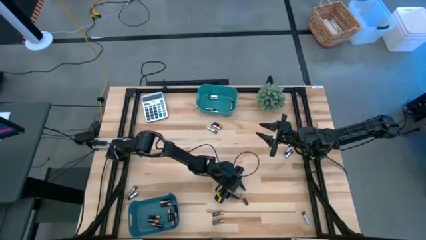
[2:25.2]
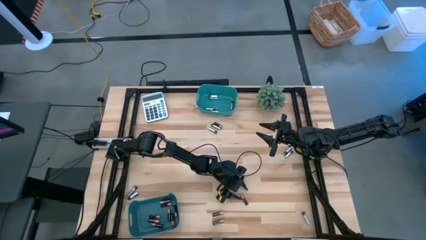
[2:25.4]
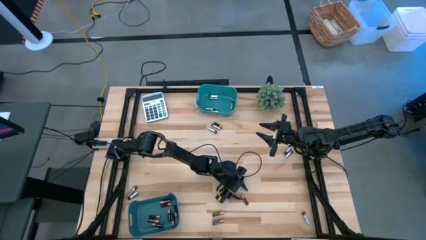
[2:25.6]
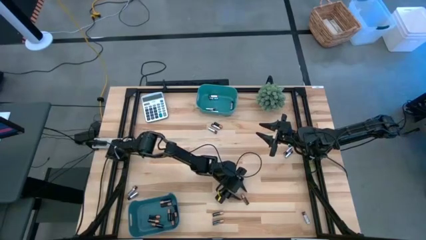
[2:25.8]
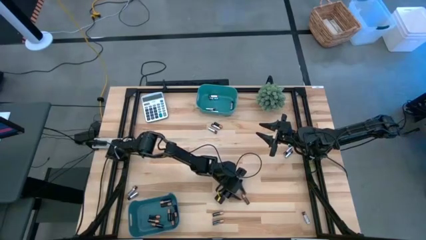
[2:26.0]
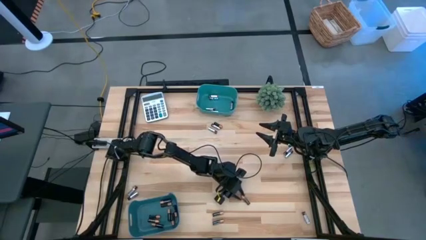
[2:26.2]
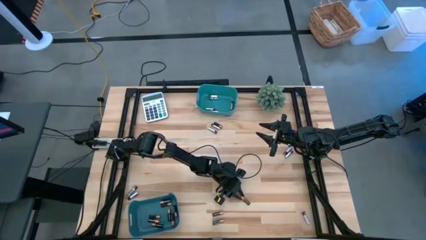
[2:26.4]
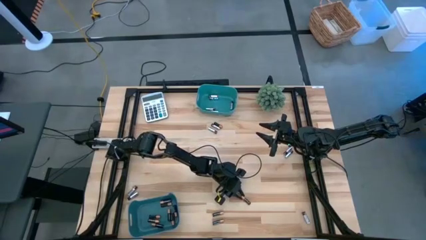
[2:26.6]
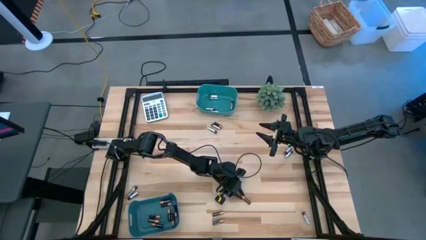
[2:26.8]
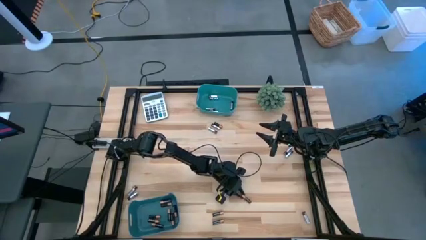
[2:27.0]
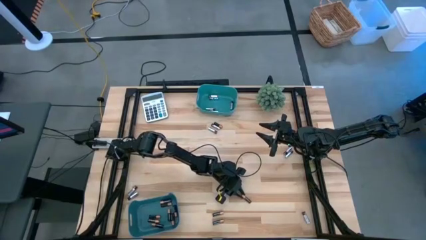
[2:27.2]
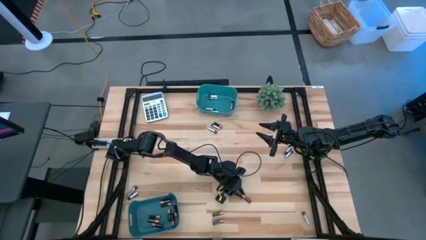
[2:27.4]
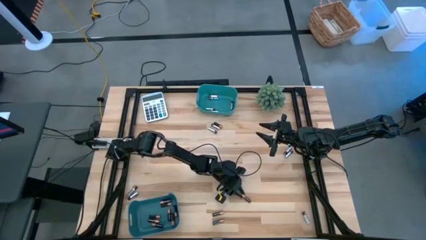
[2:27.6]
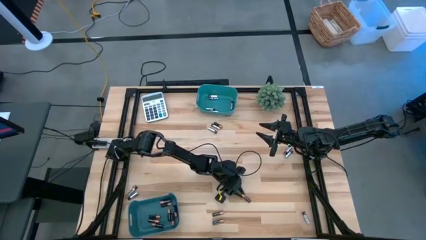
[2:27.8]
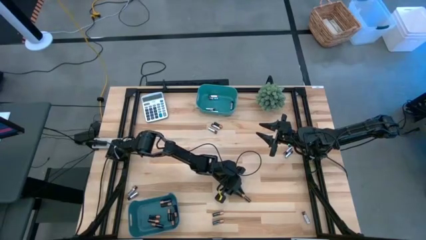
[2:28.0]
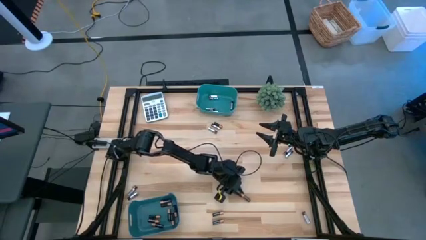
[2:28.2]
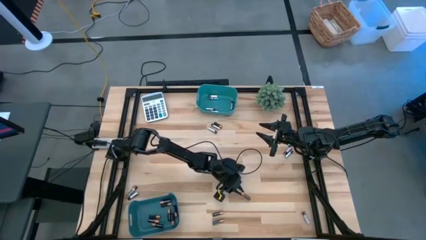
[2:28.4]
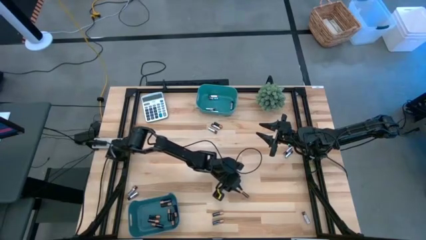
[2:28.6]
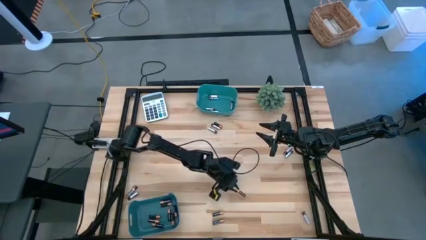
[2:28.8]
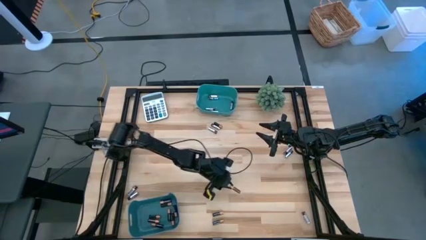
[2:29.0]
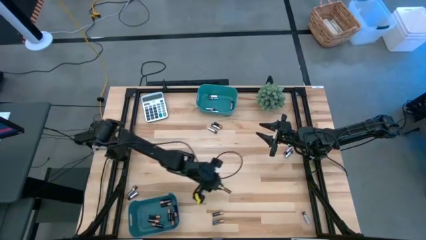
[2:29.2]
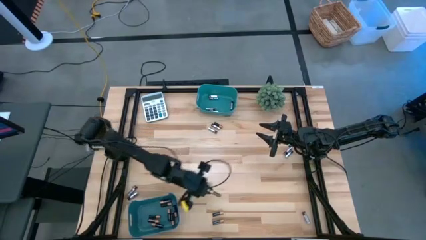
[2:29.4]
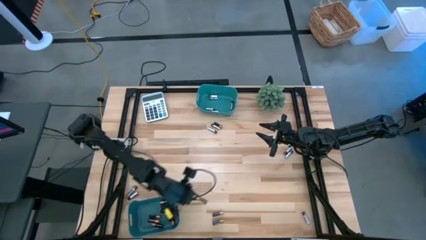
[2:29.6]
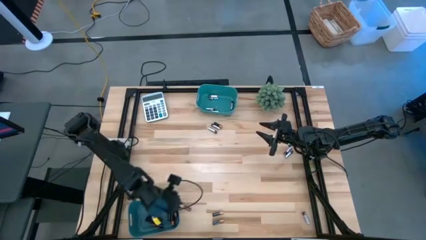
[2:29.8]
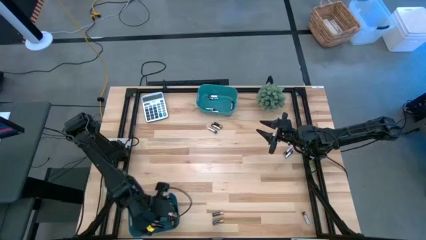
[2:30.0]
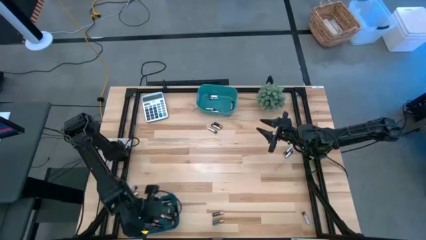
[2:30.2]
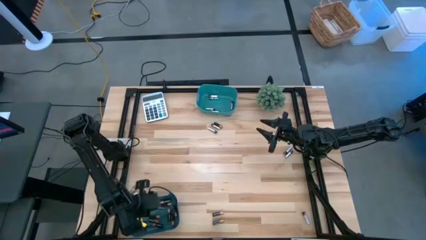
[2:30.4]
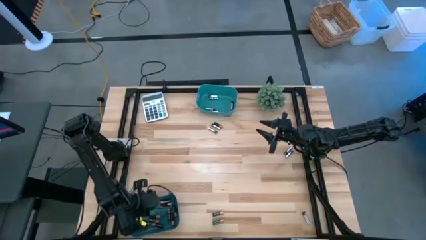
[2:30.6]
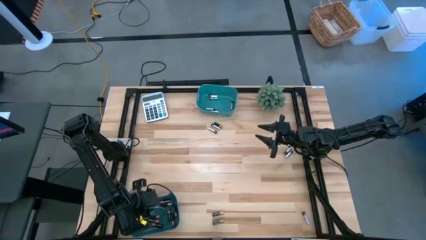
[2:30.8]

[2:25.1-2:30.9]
Task: Sort batteries
Put the gold battery into the bottom green bin

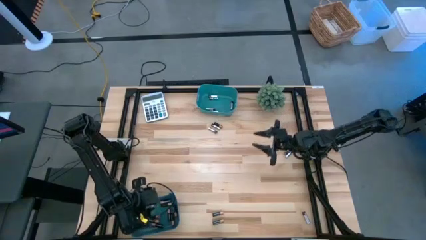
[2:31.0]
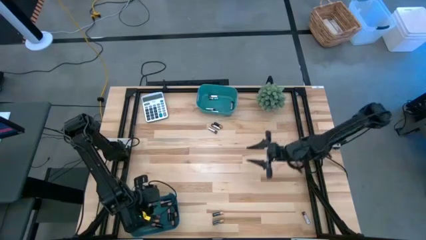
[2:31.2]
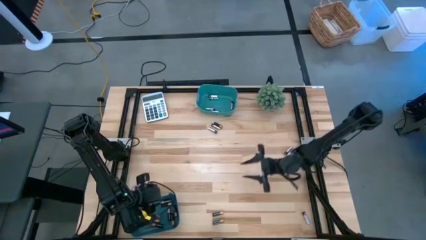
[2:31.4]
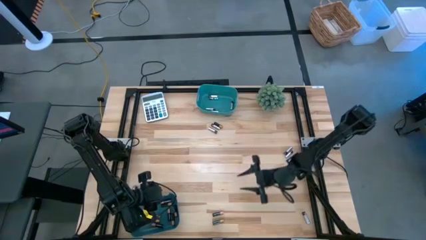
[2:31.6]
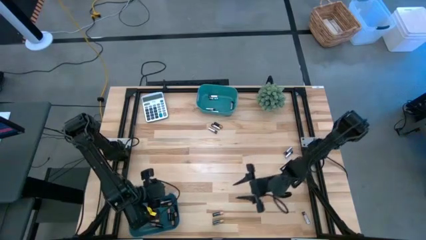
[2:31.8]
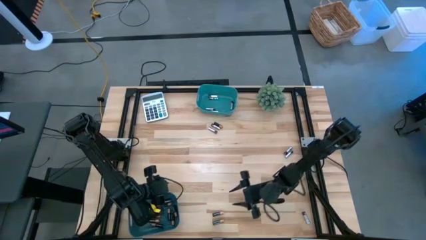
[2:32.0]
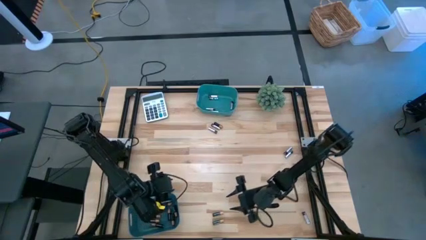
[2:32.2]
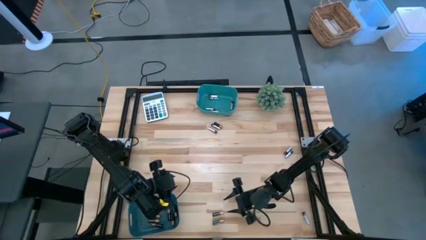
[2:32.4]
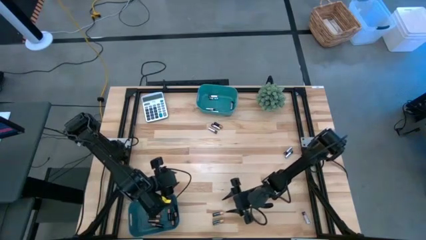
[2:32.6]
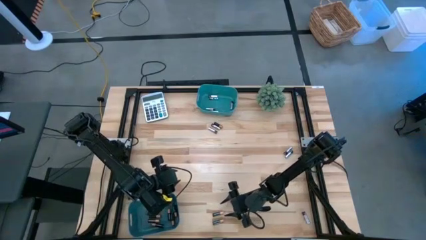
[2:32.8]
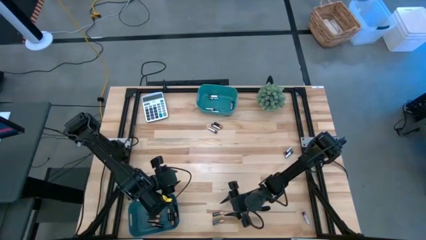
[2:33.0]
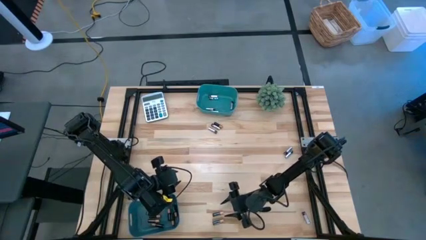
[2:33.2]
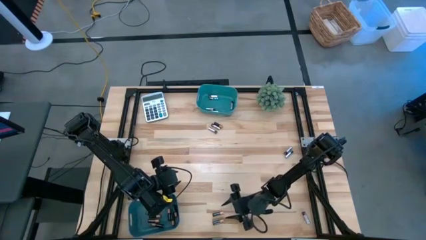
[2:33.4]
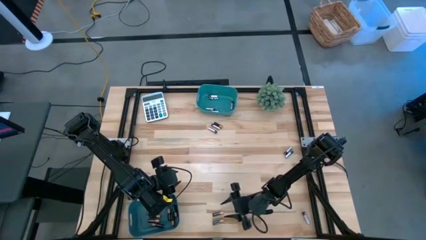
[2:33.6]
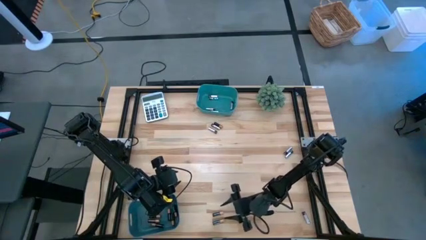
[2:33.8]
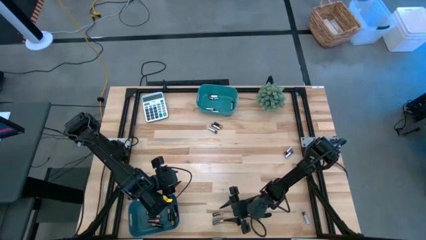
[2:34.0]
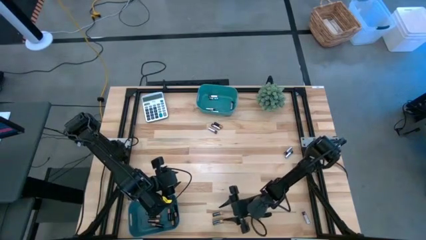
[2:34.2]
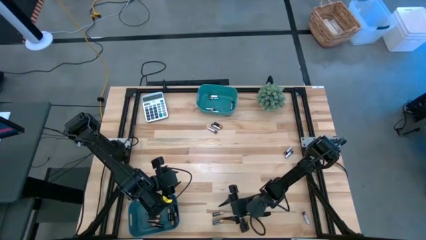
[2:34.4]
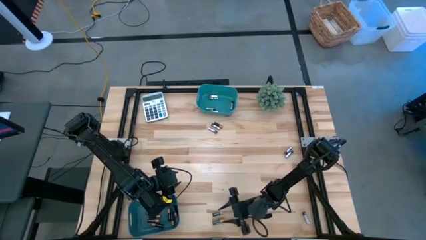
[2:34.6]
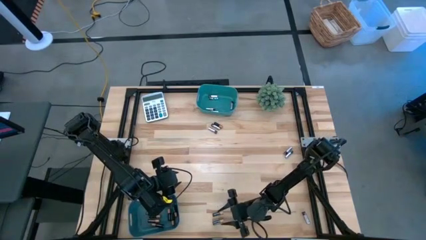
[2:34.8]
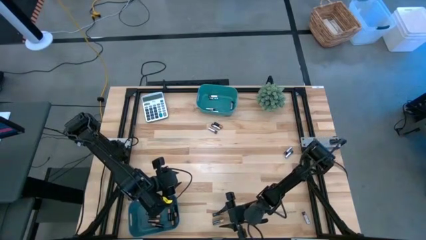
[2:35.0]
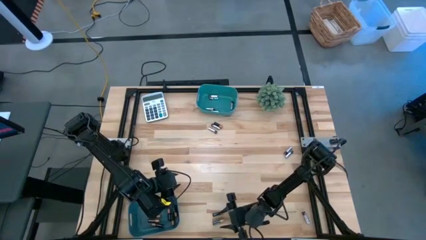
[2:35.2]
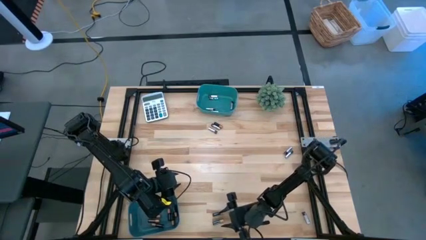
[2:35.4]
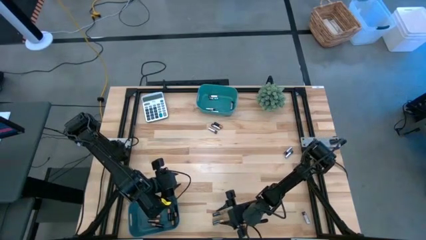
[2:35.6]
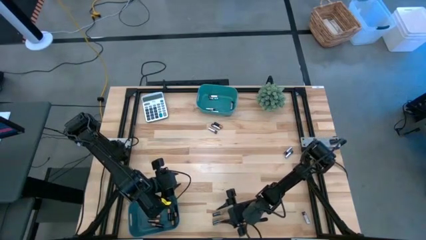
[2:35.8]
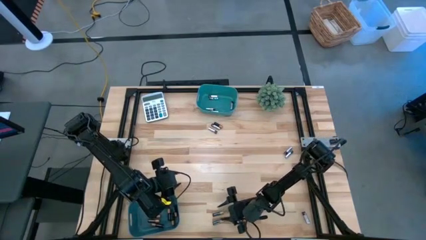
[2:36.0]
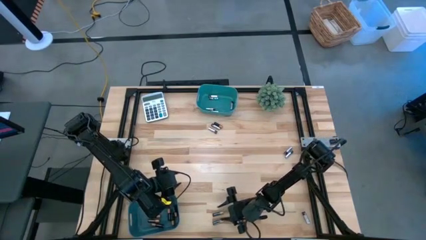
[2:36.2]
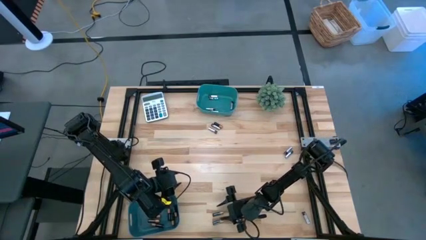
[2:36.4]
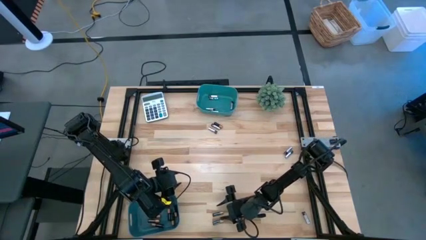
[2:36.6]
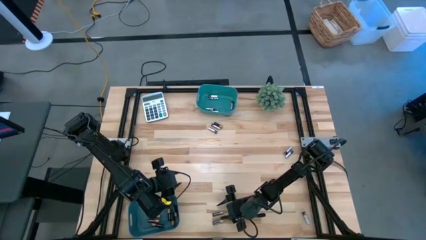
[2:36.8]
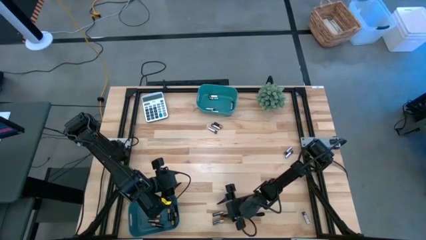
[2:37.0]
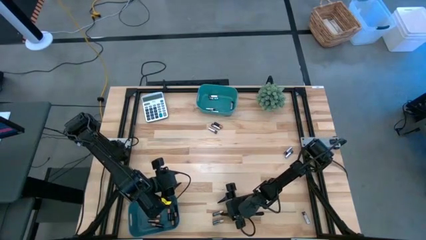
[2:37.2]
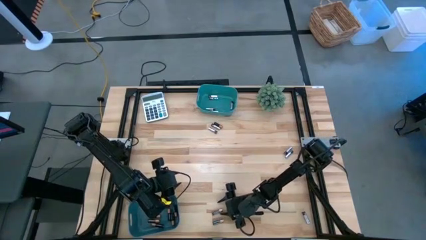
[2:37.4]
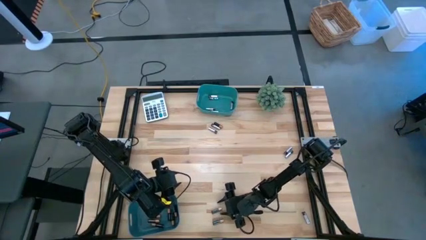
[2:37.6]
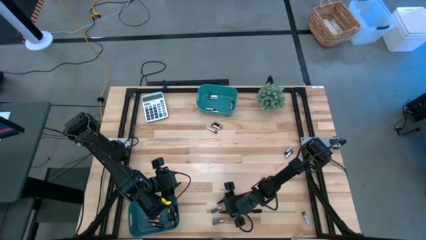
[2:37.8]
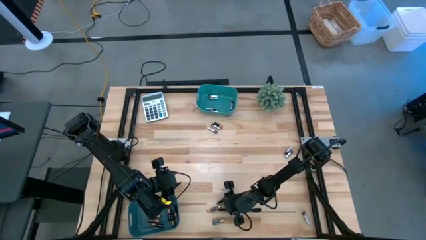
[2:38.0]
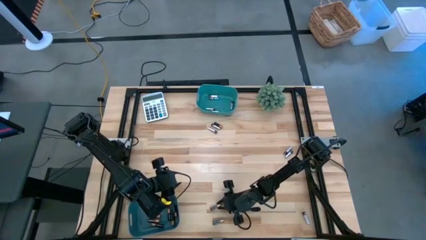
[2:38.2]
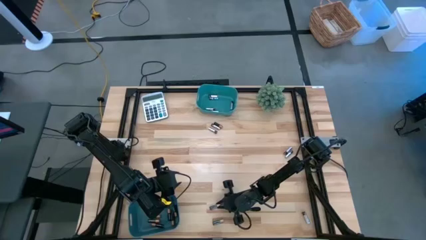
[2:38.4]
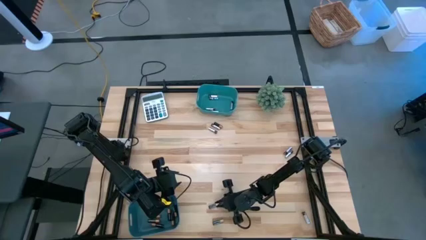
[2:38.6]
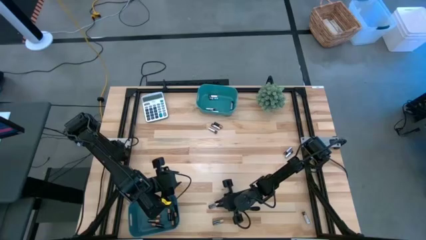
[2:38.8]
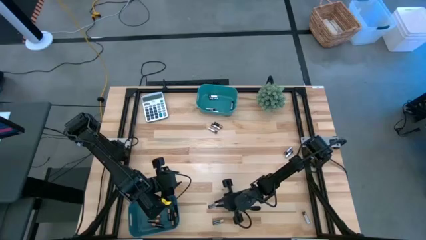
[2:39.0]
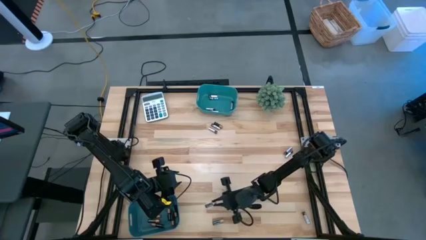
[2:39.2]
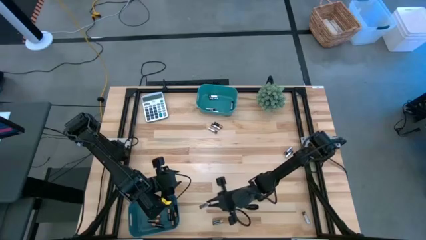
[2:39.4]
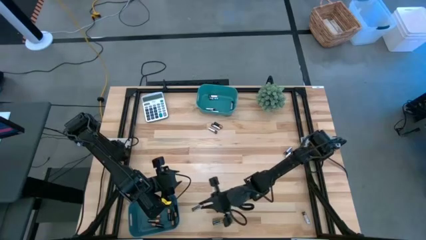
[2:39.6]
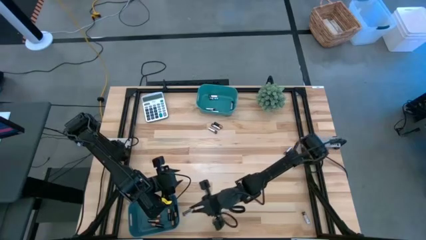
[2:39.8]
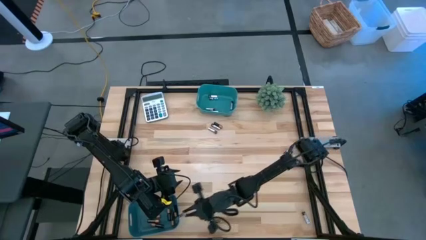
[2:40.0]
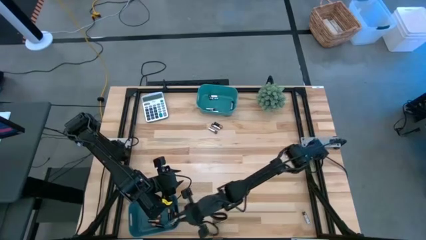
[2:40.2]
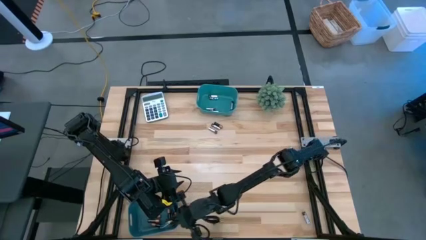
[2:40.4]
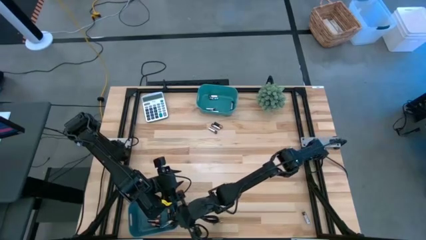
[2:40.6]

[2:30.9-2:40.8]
Put the gold battery into the bottom green bin

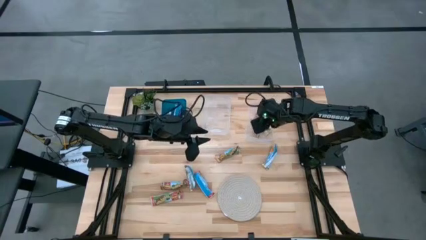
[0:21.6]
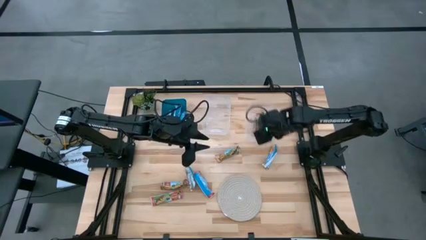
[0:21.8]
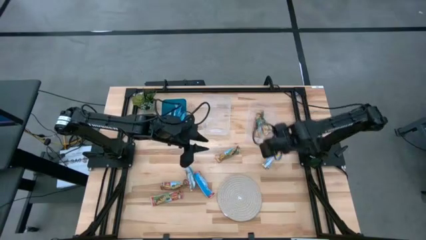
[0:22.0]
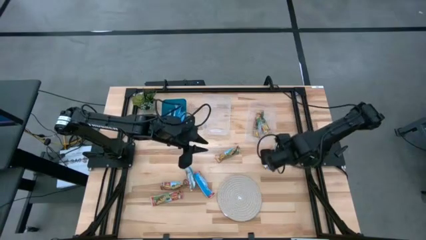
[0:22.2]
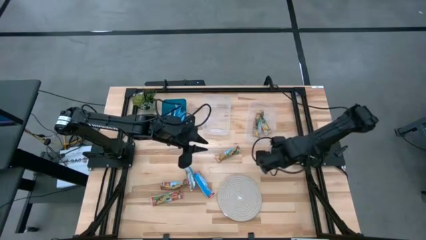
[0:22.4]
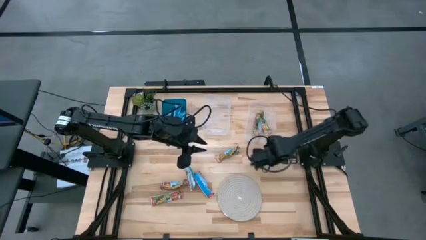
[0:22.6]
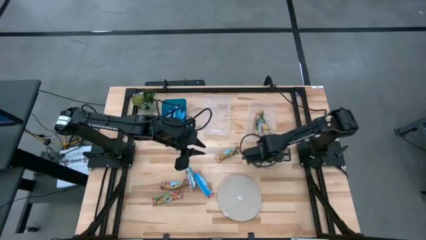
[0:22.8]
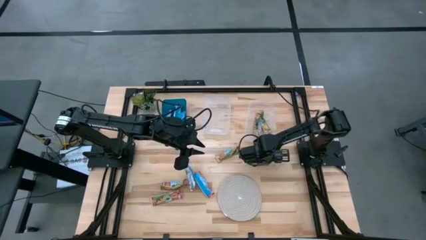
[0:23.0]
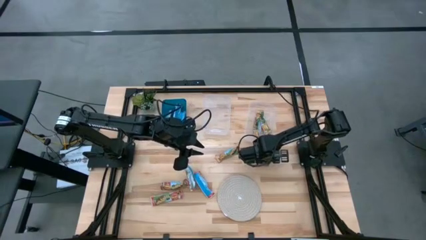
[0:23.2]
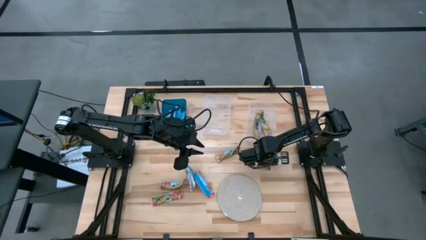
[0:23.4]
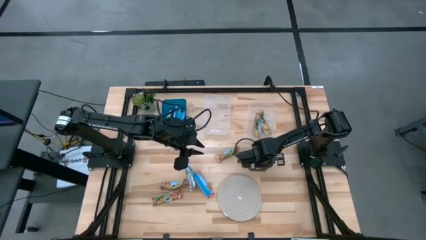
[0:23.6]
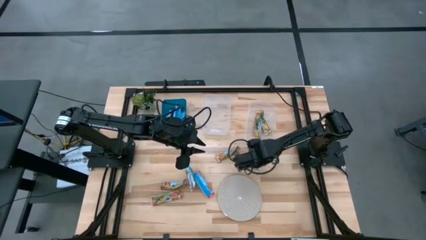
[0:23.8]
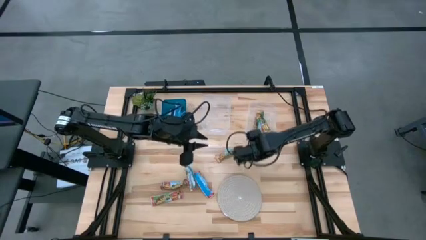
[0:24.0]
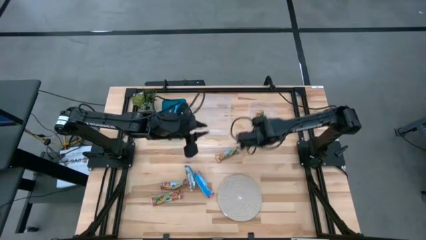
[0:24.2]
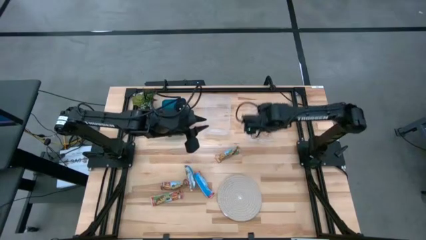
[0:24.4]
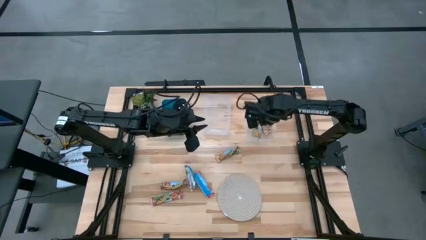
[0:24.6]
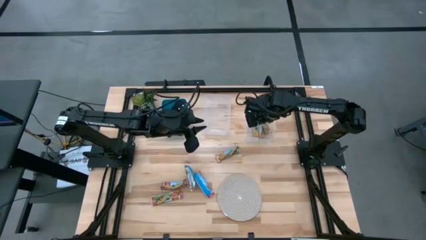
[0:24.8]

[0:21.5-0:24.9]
Task: Pick and place Granola Bars by type
Put the yellow granola bar into the right transparent bin
